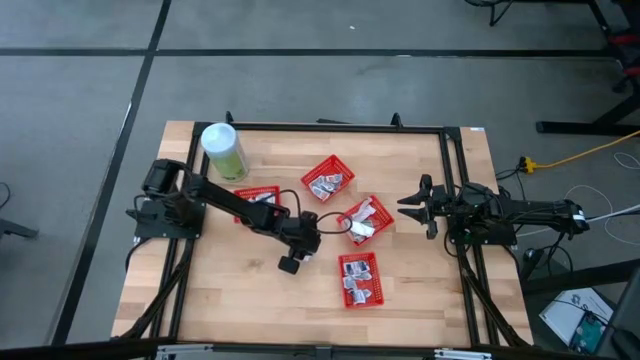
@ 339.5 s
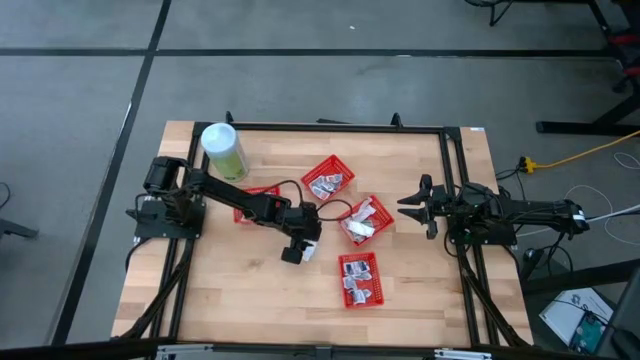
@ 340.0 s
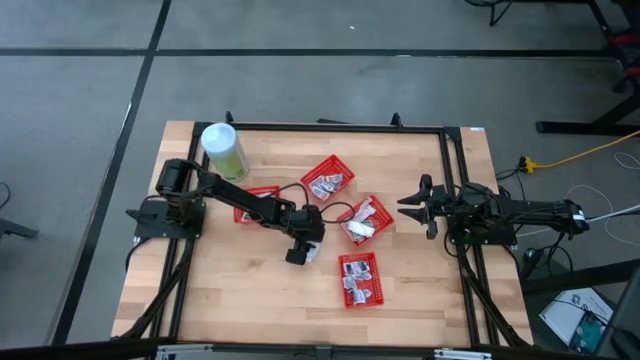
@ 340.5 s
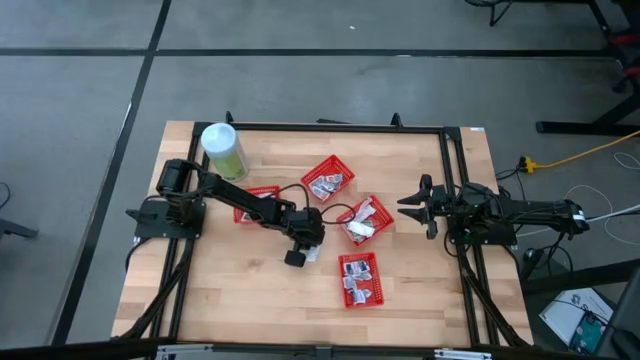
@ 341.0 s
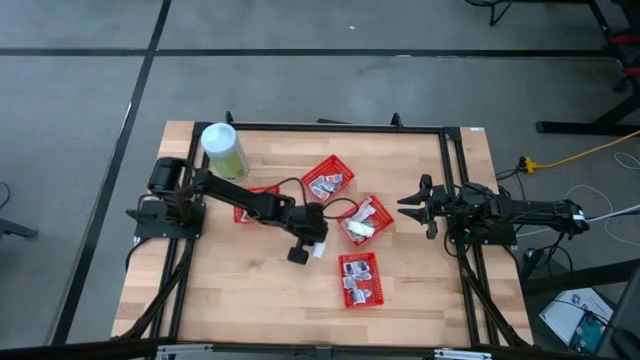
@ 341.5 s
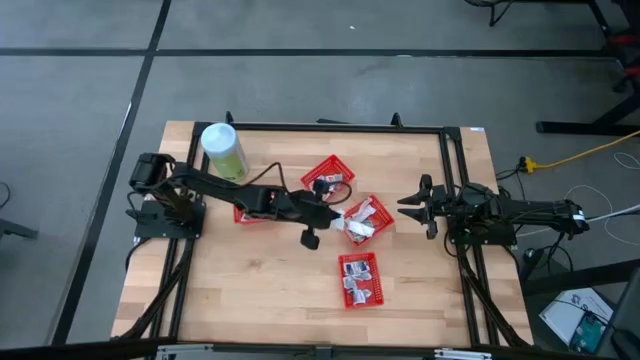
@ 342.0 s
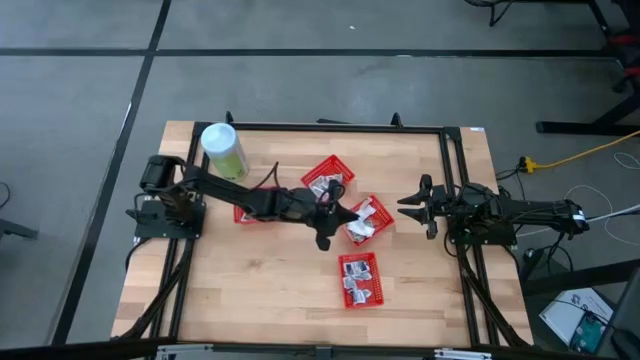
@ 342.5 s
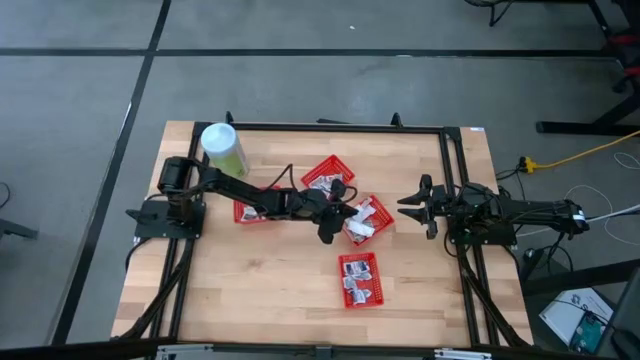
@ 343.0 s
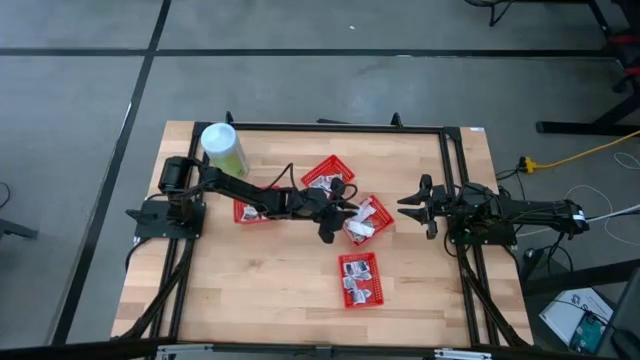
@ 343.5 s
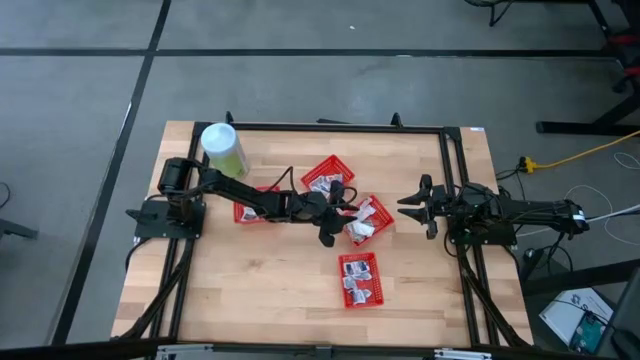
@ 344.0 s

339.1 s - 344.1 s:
Task: Pick & Place First Aid Supplies
Put the green bandage into the red container

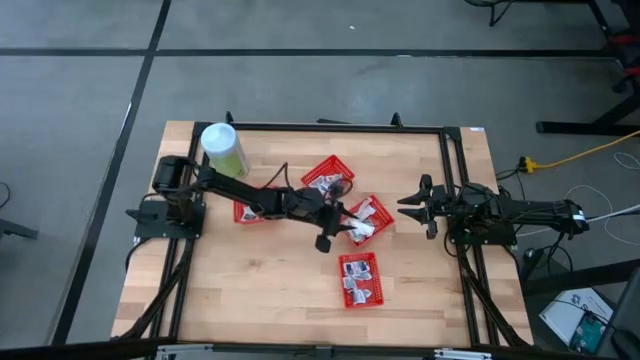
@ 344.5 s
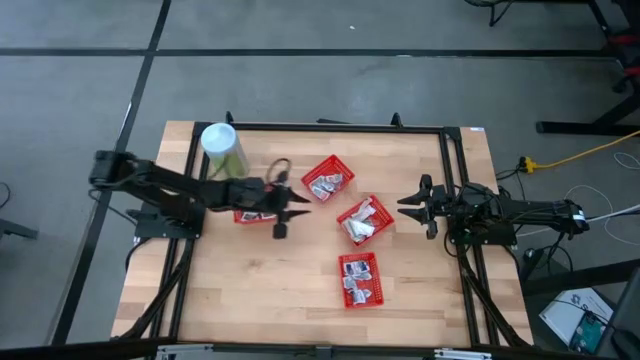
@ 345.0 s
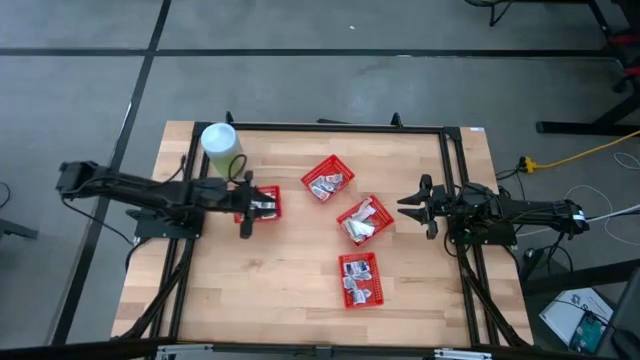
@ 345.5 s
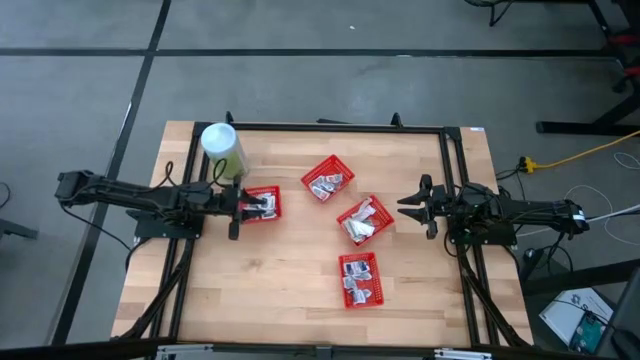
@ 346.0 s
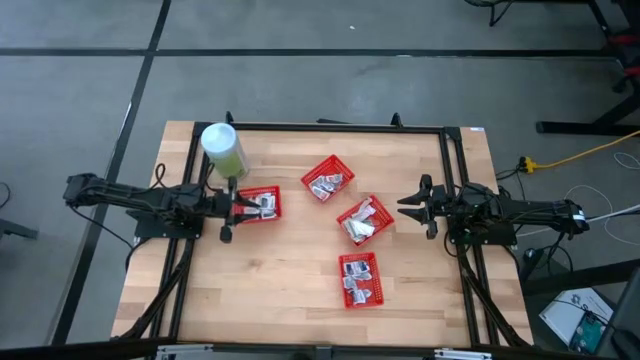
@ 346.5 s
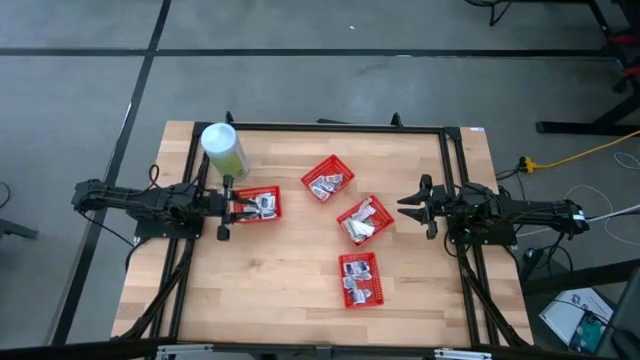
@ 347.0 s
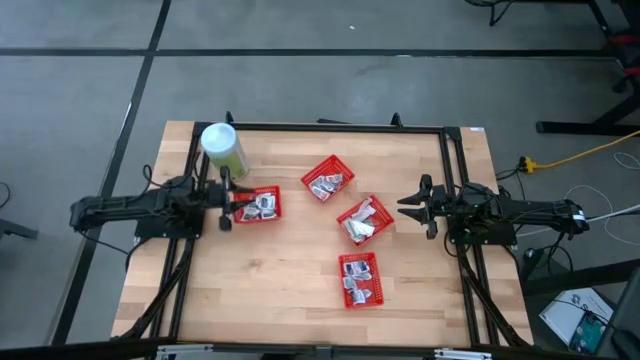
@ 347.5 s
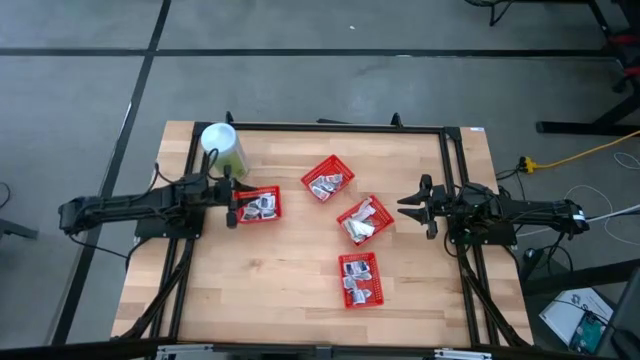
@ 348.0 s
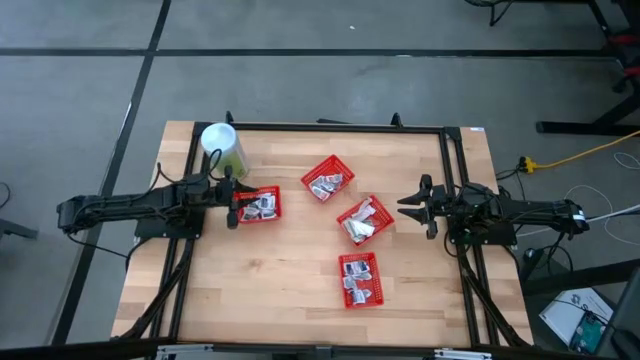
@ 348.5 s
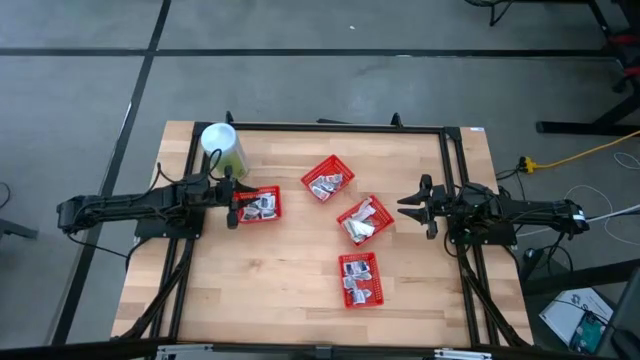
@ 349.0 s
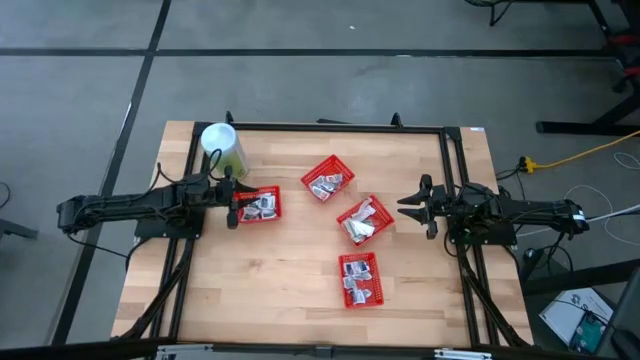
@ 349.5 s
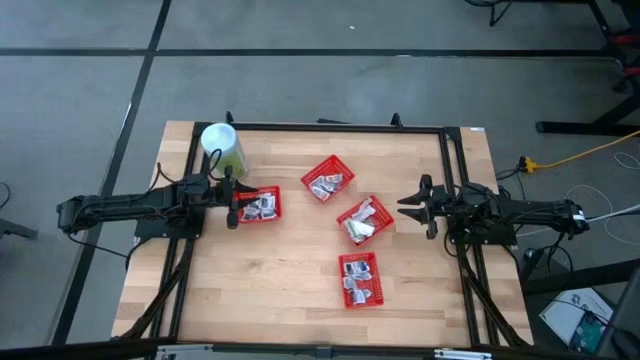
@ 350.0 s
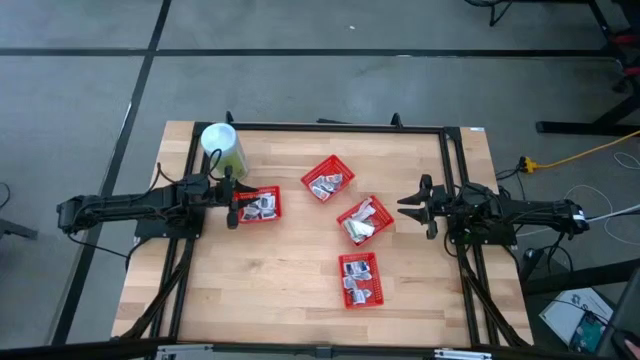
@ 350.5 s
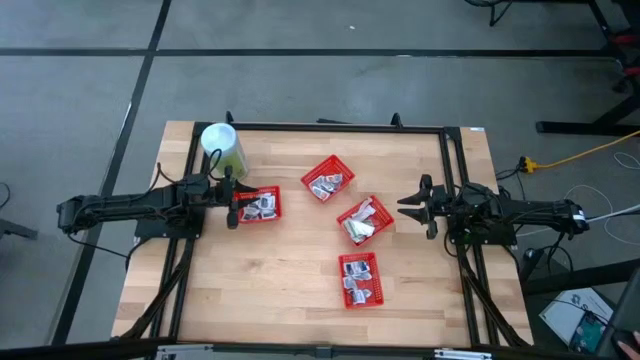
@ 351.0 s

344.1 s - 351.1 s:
Return to Home Position

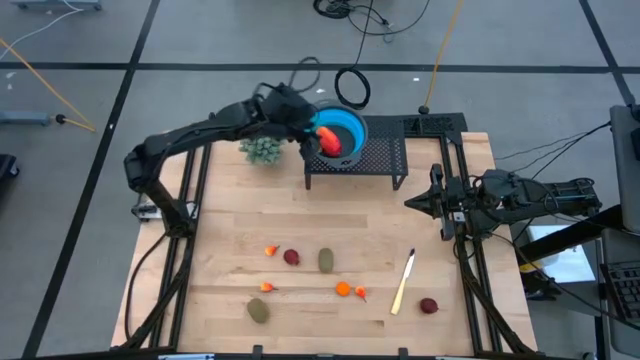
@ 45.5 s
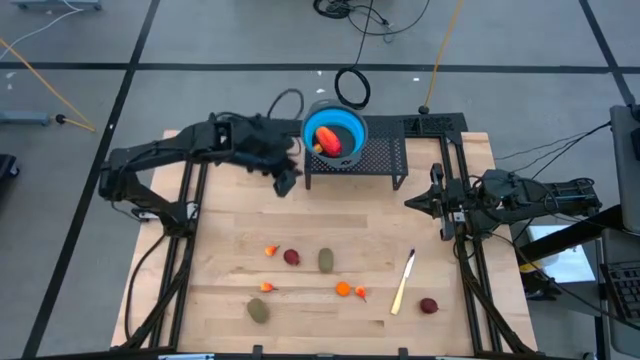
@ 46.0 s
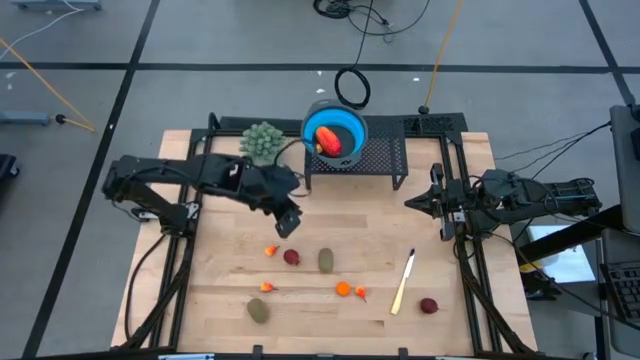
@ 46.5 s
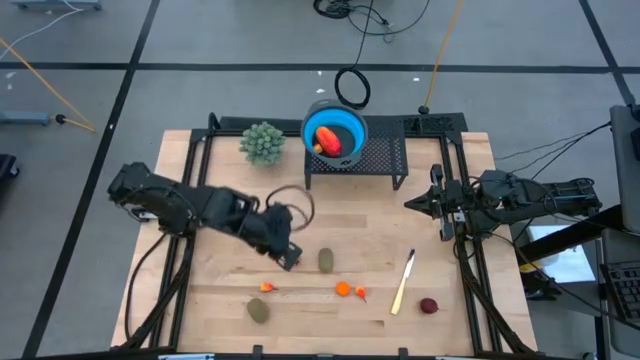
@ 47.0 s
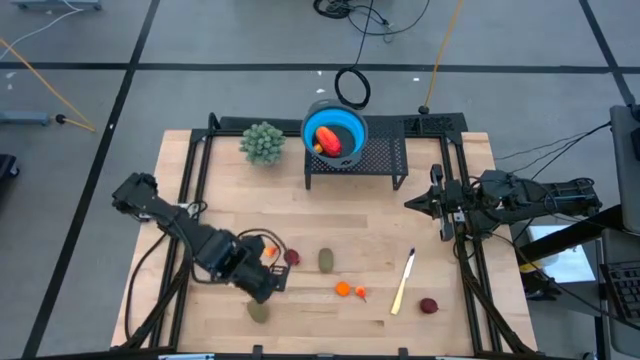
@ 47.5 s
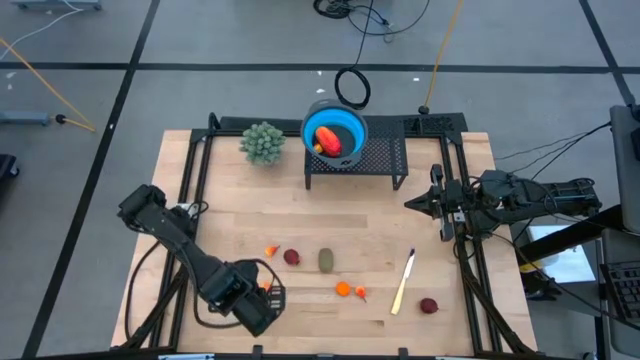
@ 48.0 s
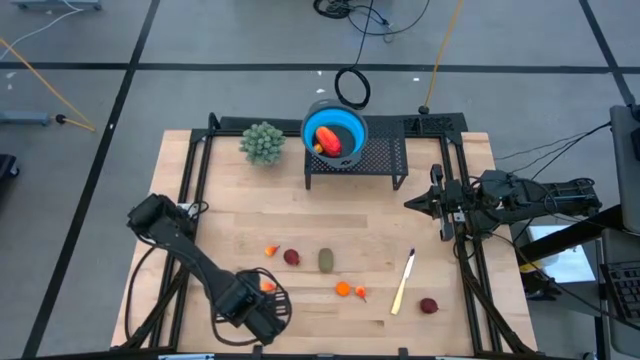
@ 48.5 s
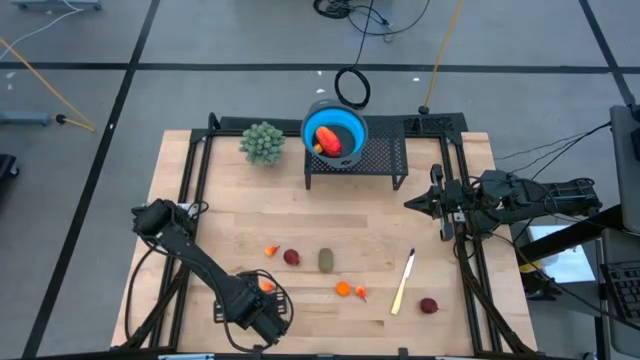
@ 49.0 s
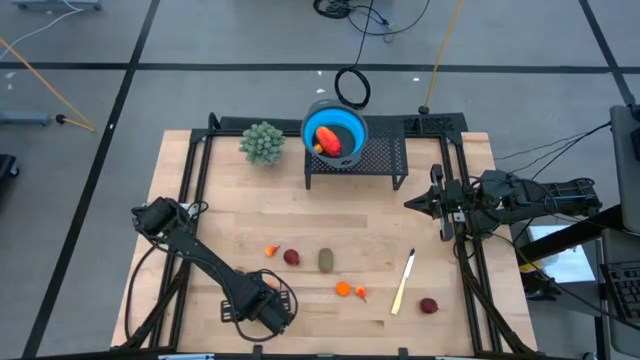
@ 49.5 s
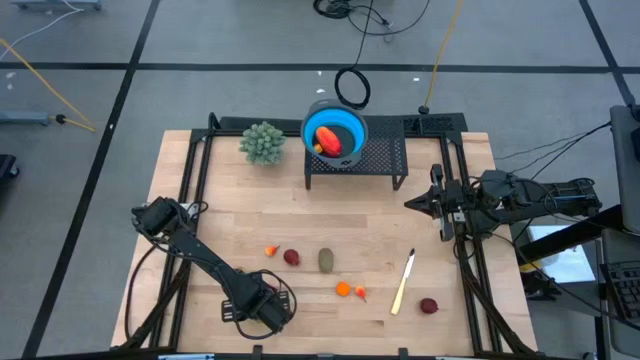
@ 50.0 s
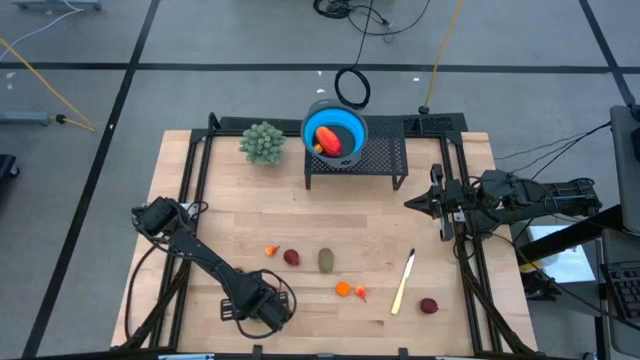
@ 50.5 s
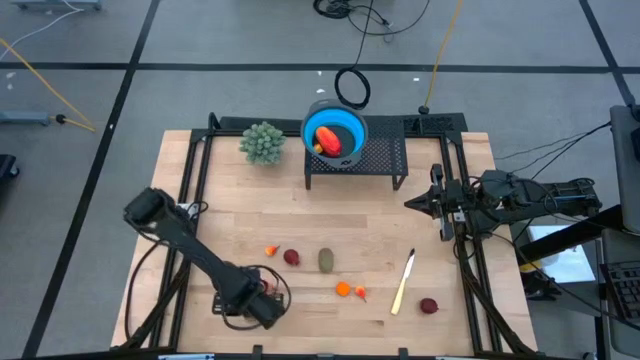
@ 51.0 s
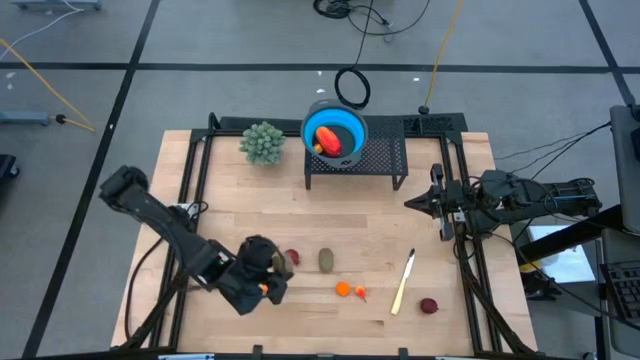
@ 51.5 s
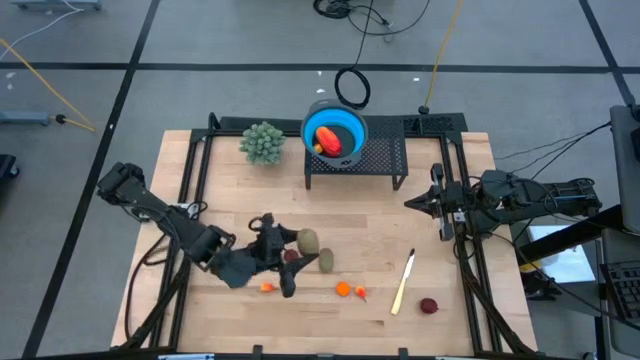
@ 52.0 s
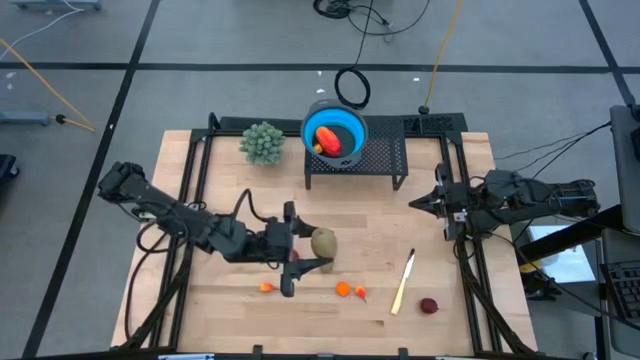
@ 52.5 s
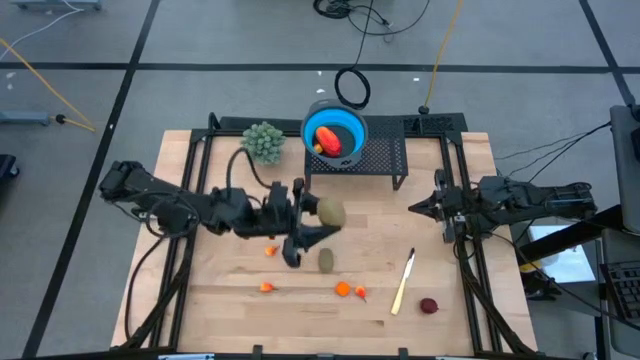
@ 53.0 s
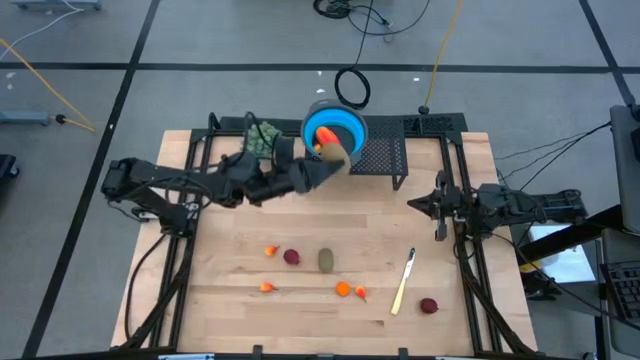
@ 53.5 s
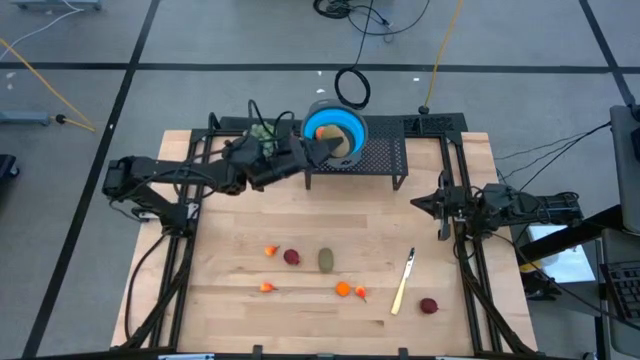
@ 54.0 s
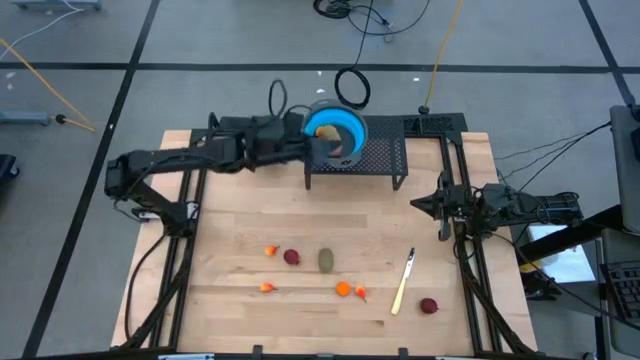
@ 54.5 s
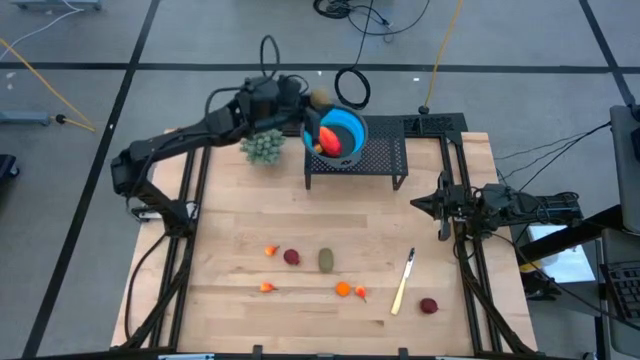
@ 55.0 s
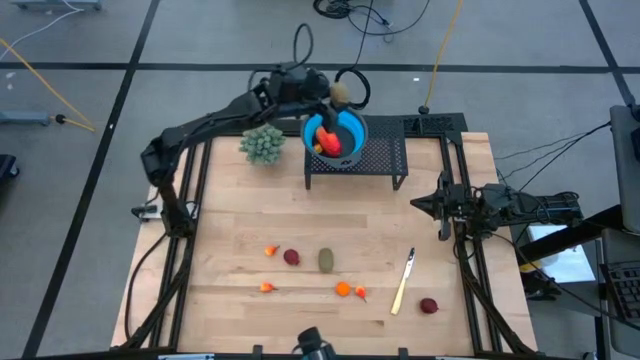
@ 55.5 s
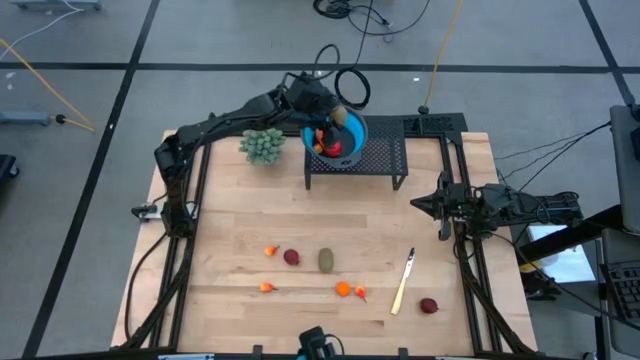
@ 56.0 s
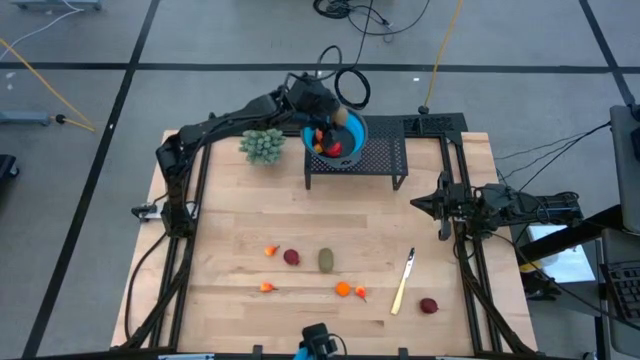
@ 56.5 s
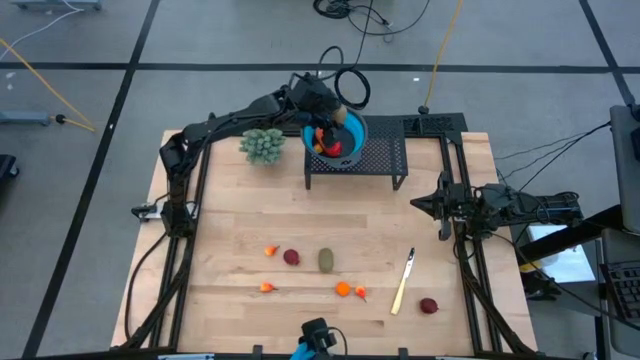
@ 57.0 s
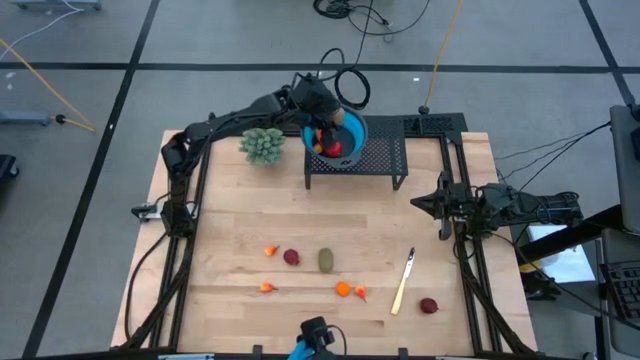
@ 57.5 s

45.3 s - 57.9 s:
Task: Pick & Place Fruit
Put the kiwi into the blue strainer on the shelf
